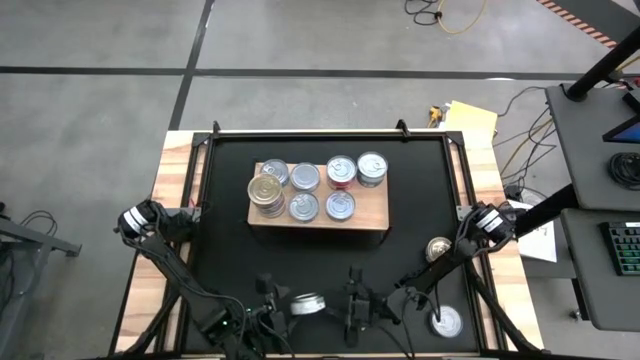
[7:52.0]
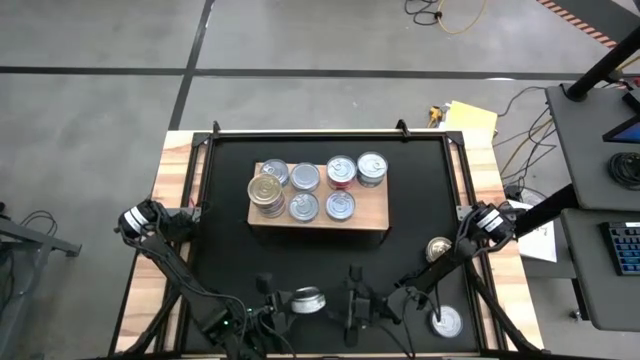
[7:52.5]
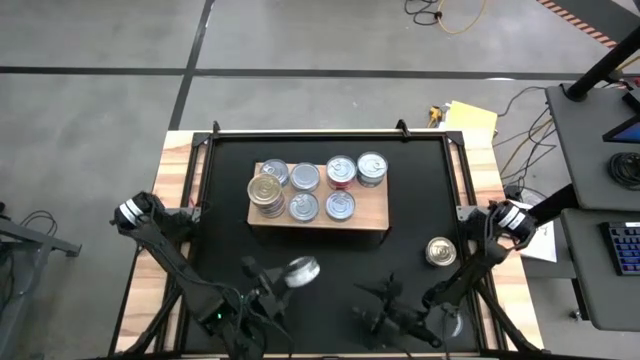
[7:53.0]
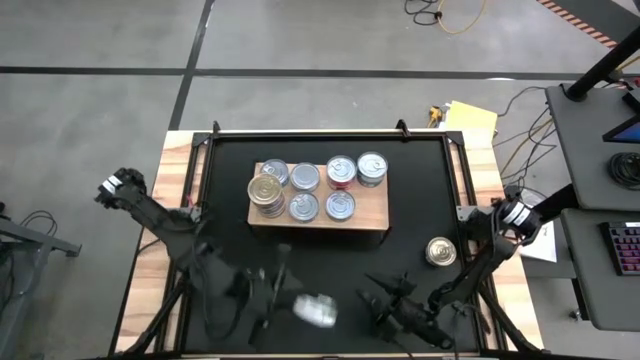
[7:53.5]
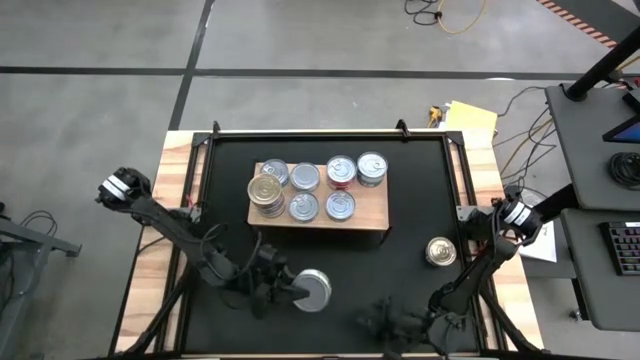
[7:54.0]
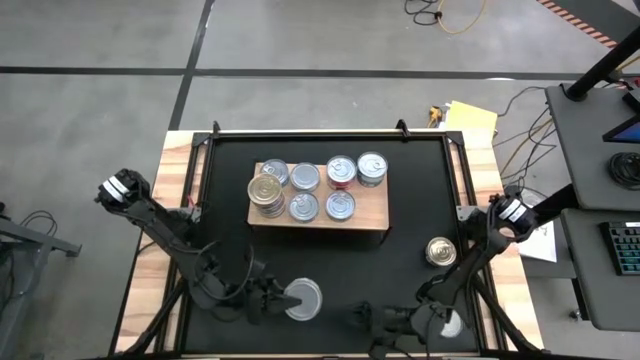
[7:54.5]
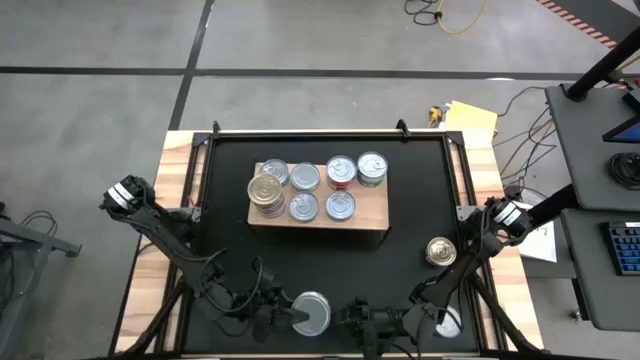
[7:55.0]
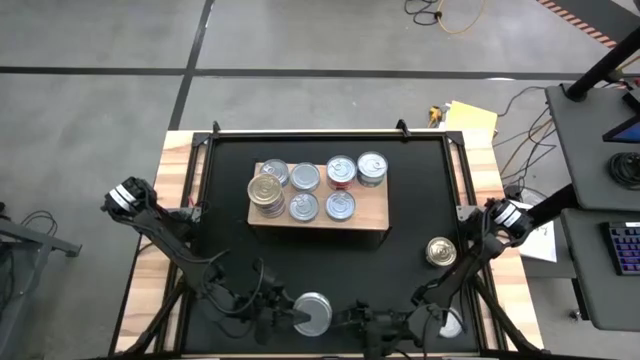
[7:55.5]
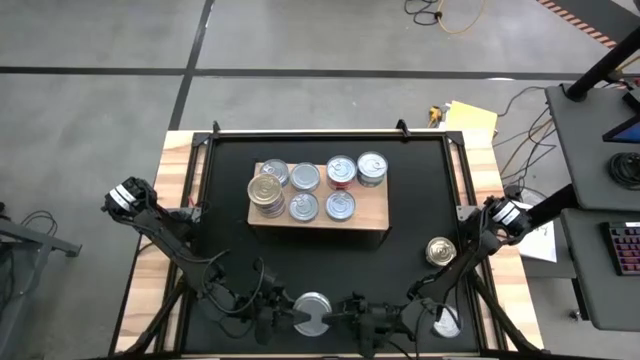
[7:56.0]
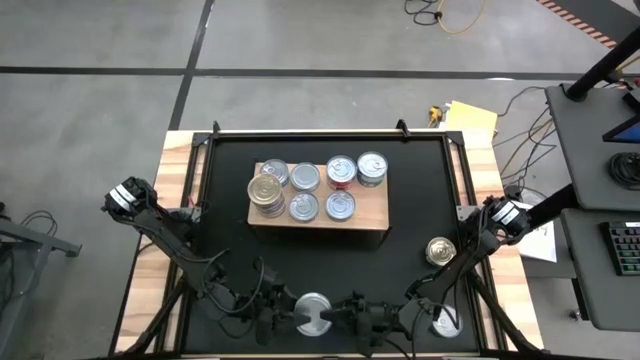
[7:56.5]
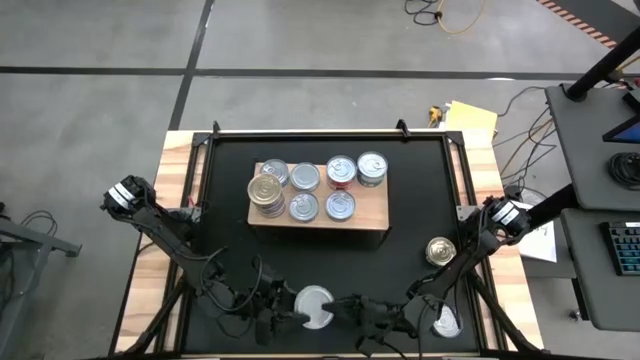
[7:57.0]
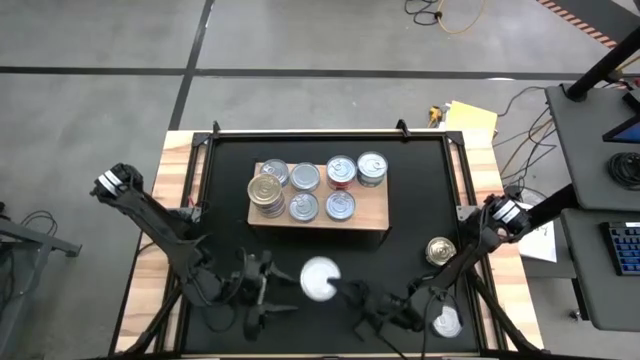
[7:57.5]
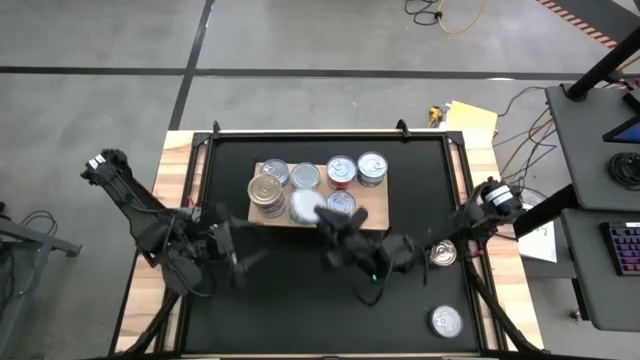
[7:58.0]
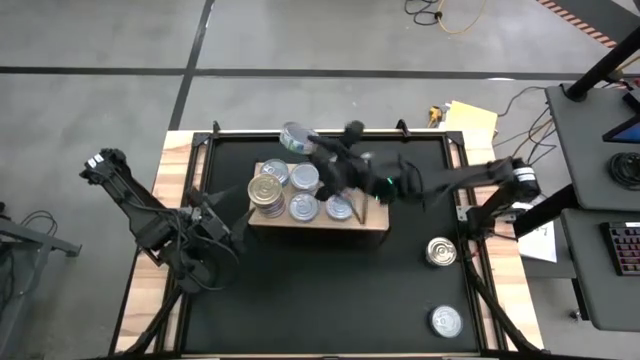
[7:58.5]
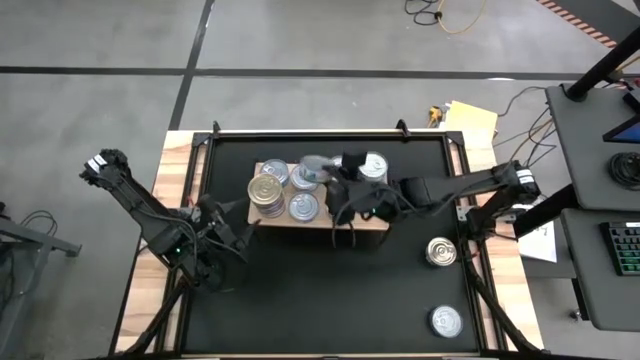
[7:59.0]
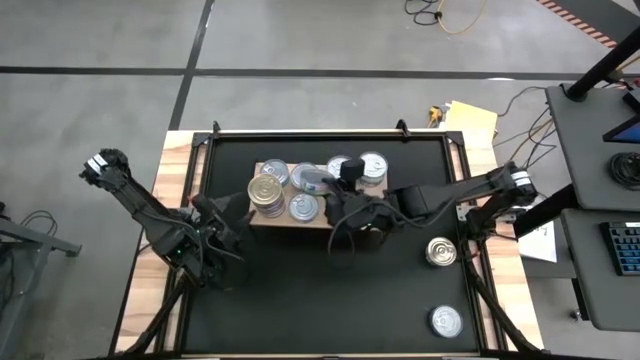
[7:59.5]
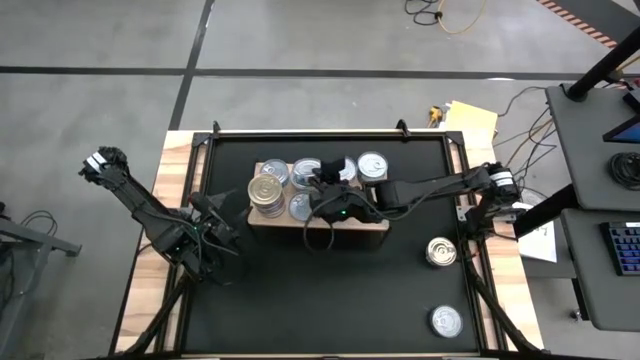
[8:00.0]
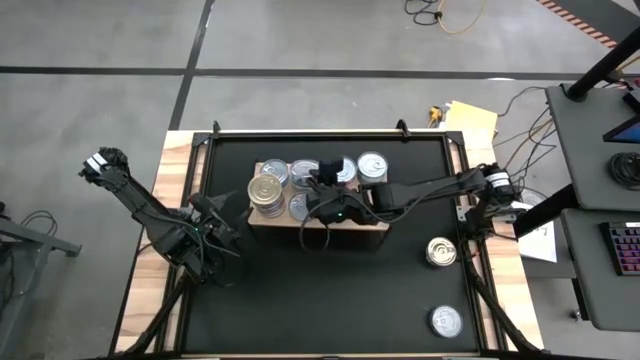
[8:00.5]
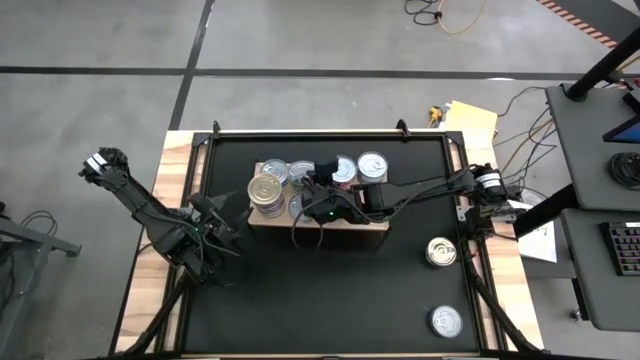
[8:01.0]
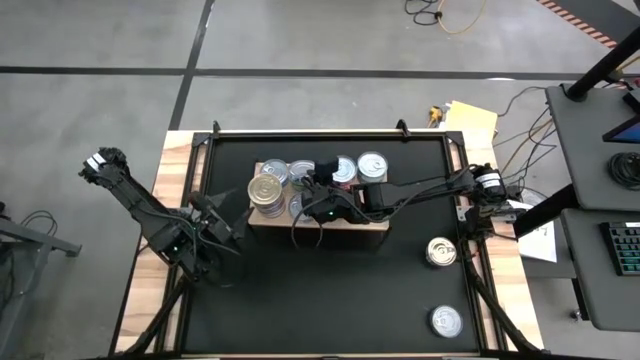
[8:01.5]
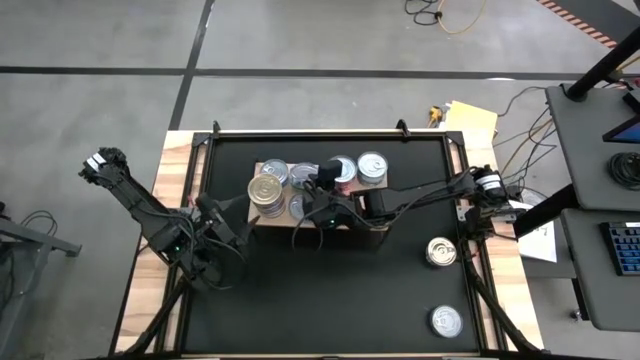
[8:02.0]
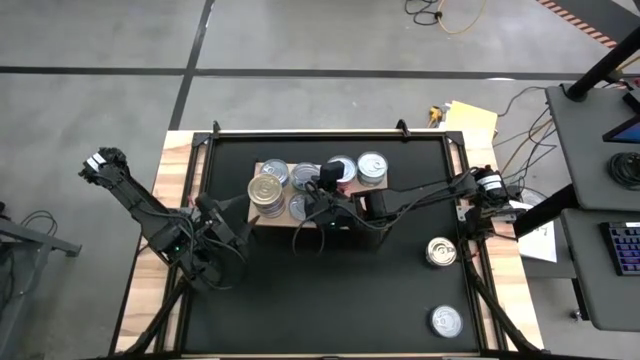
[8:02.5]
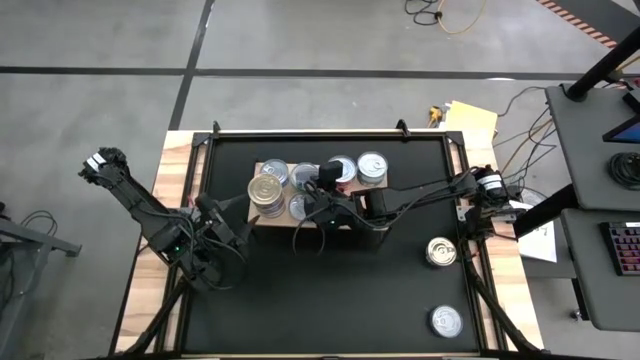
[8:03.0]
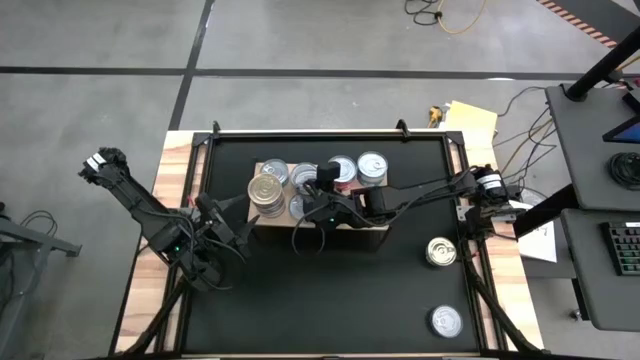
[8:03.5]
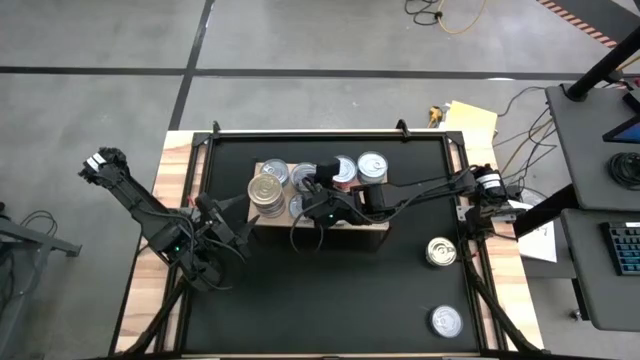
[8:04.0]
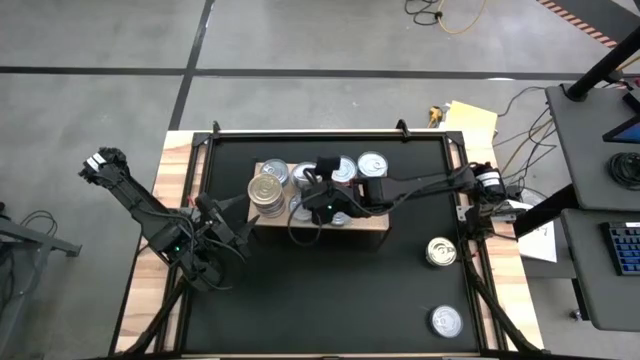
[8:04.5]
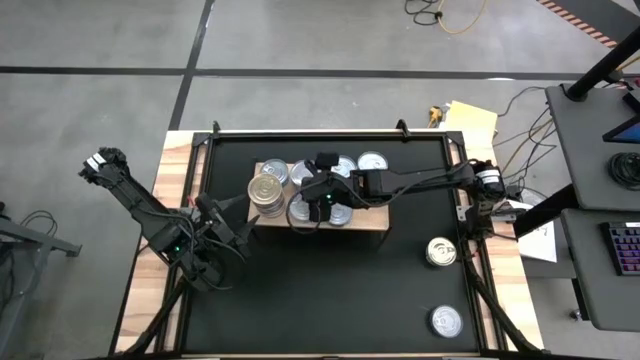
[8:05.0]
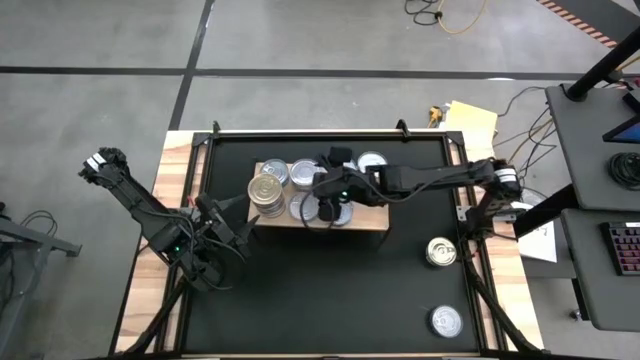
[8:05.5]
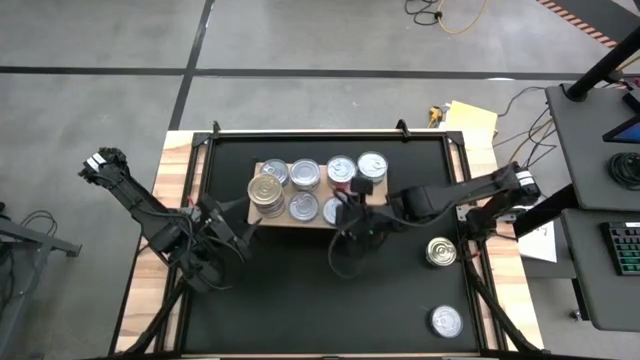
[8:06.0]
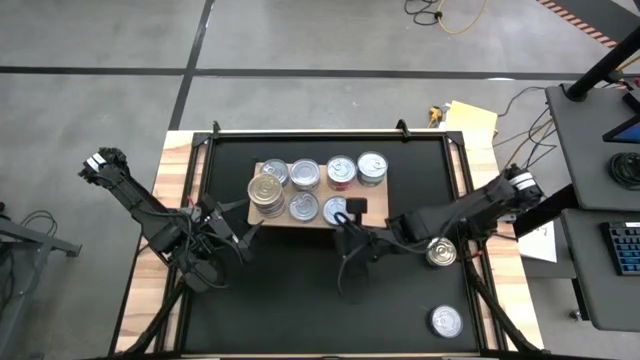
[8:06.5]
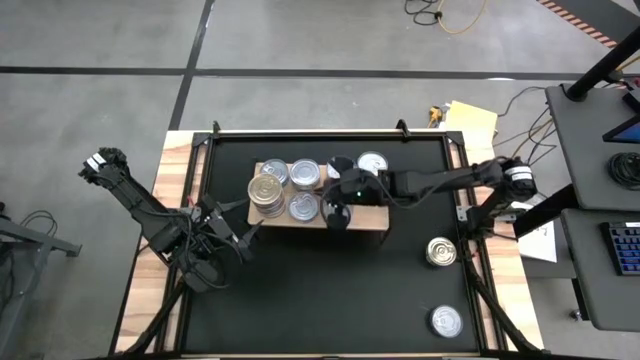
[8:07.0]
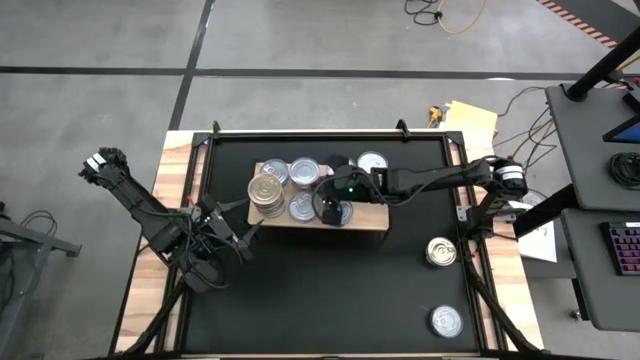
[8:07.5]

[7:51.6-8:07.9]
Task: Stack canned seafood by type on shelf
Stack the green tuna can on the green tuna can

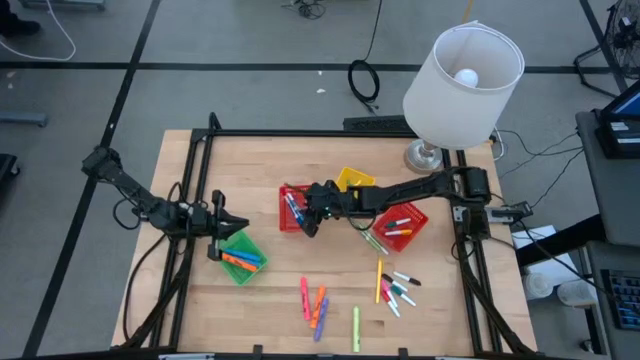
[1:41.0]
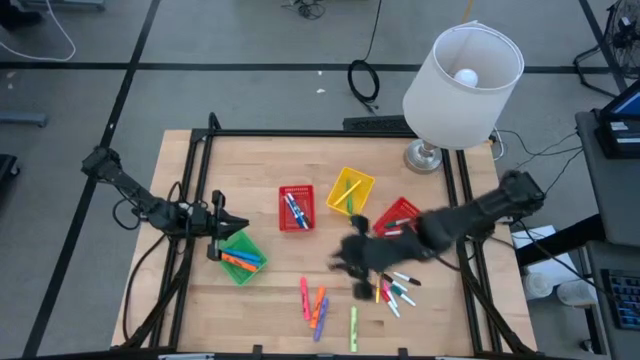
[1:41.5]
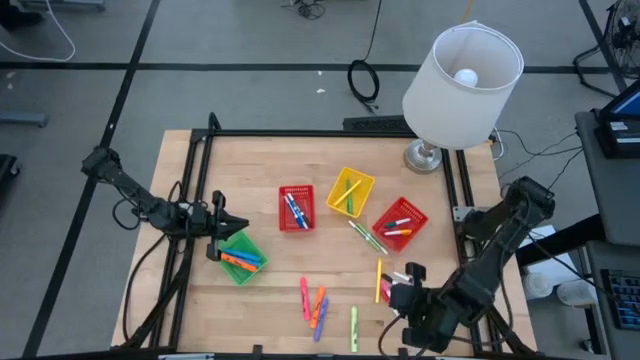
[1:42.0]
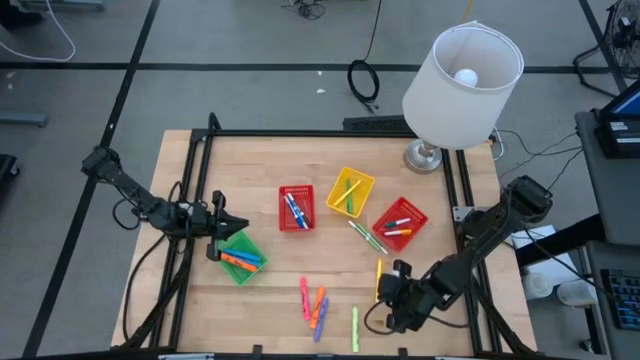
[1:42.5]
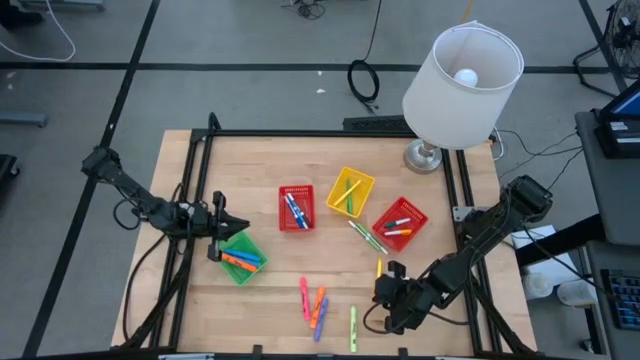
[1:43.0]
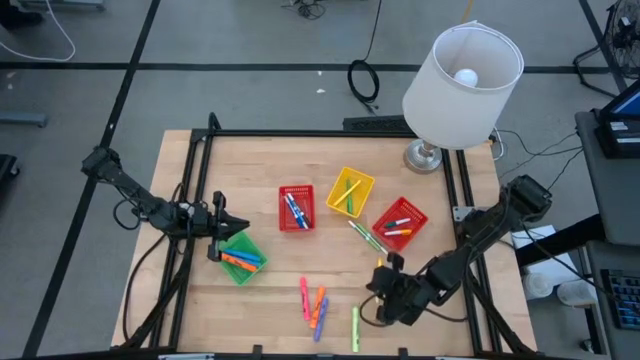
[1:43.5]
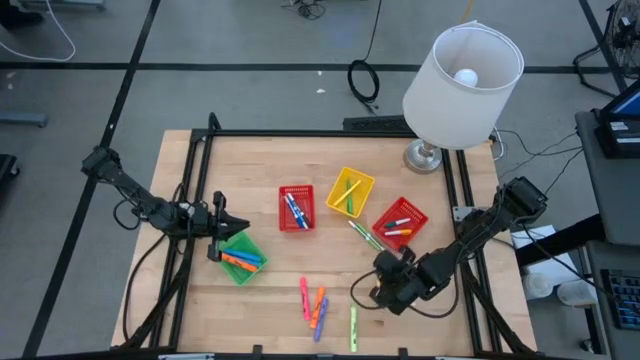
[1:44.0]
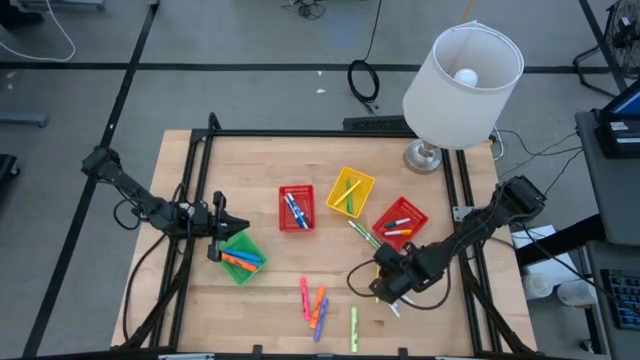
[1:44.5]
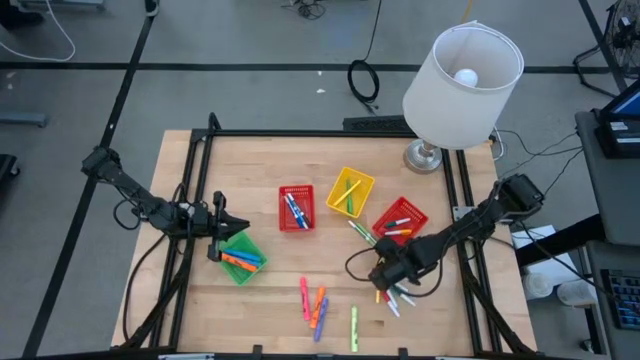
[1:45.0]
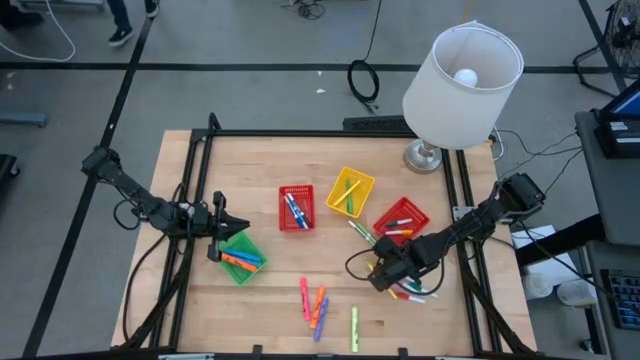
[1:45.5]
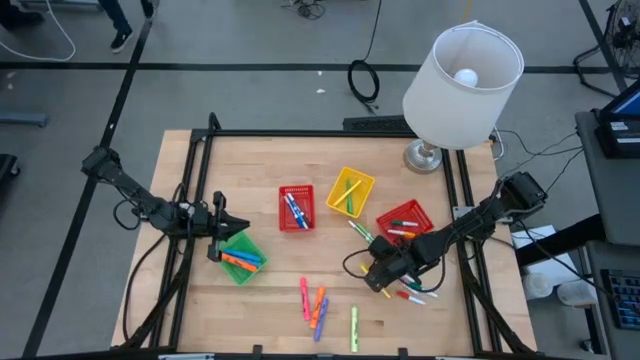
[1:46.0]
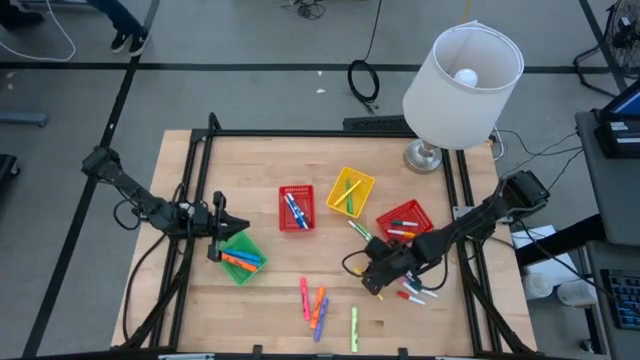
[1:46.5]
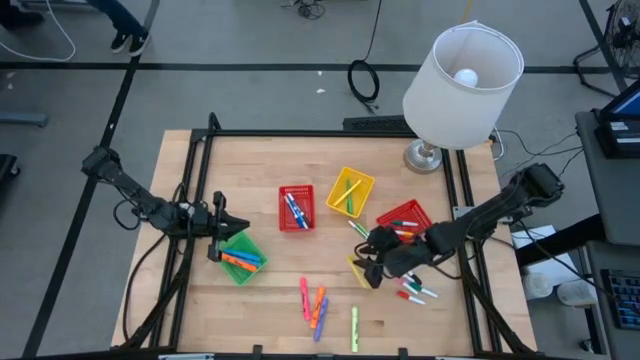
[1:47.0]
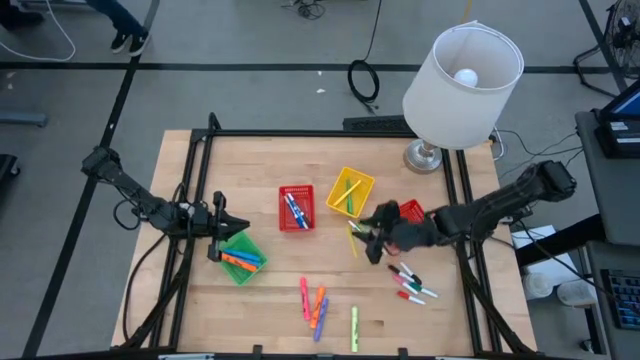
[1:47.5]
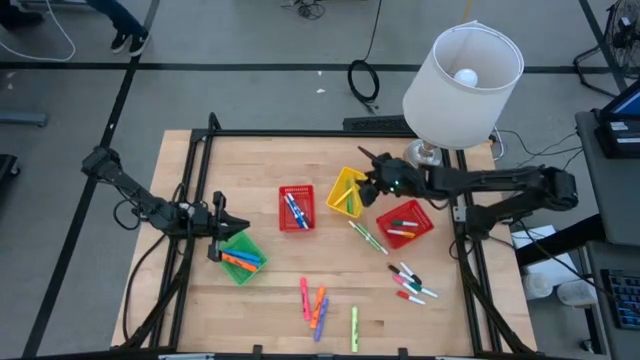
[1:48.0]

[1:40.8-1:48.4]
Task: Pick & Place Markers
Put the yellow pen into the yellow bin
